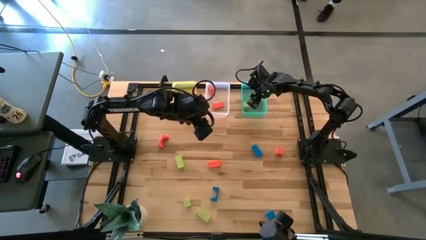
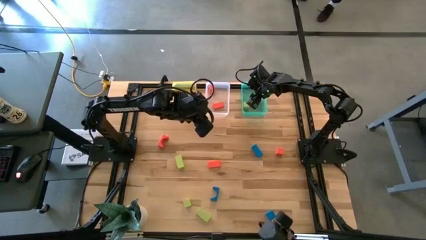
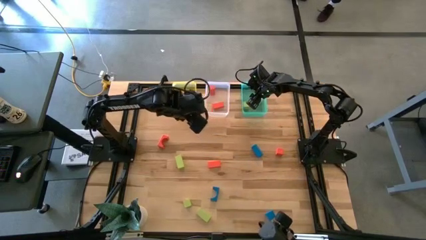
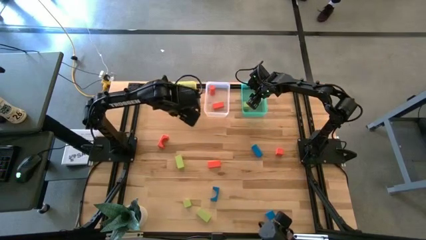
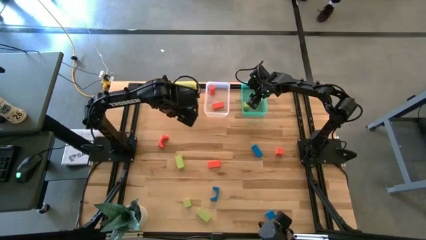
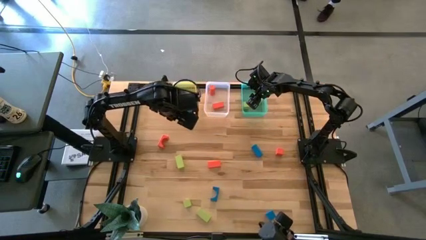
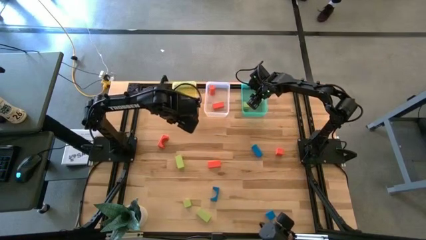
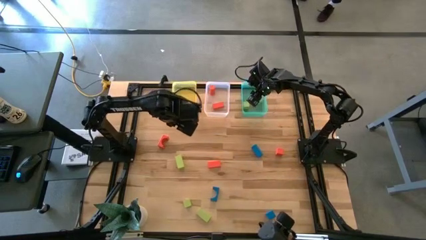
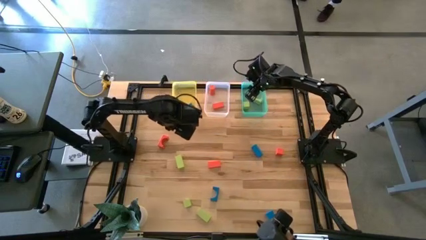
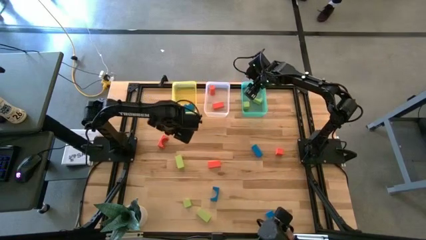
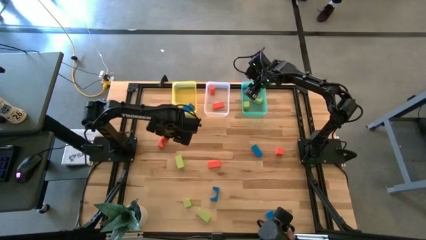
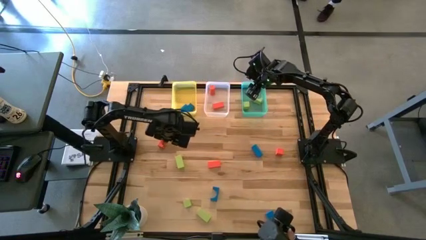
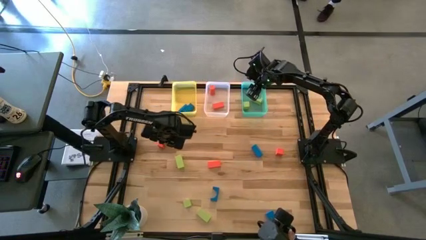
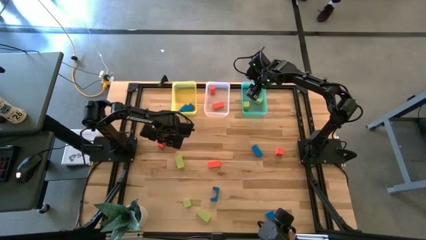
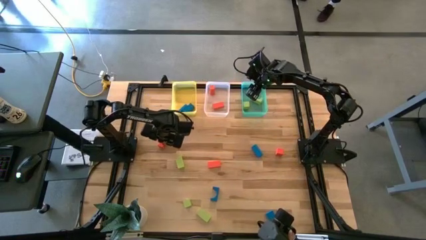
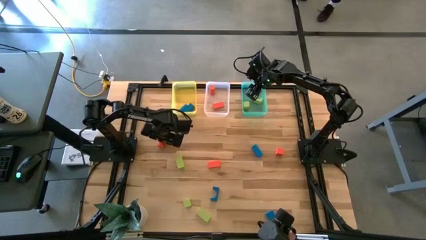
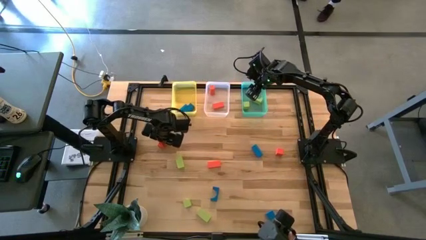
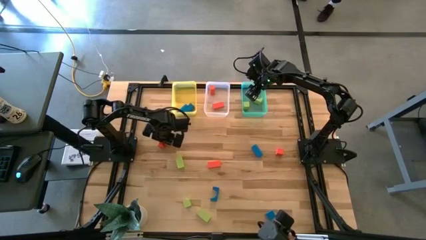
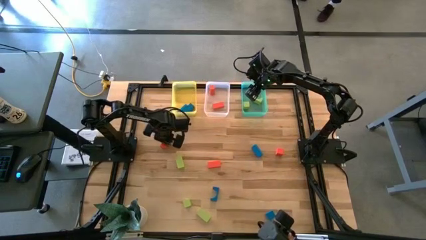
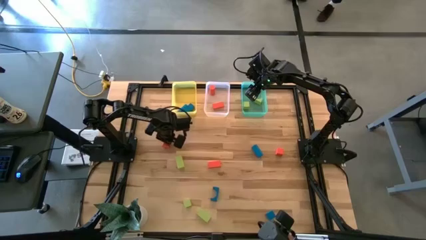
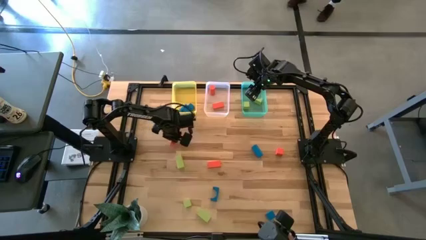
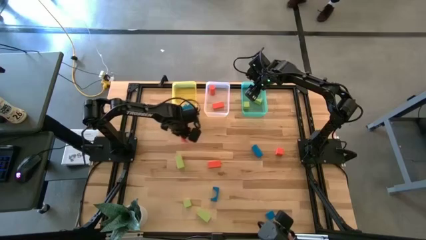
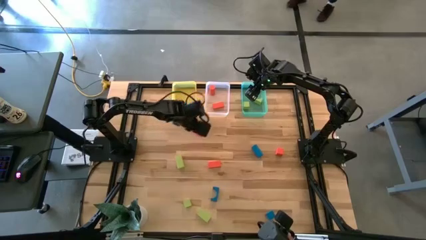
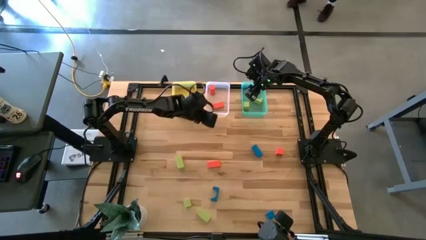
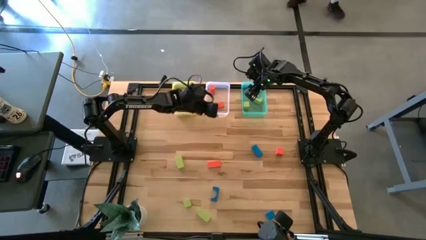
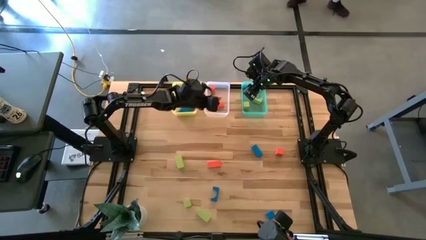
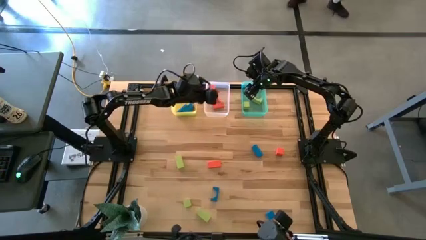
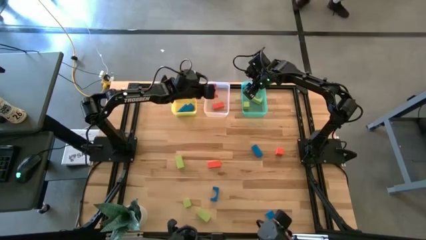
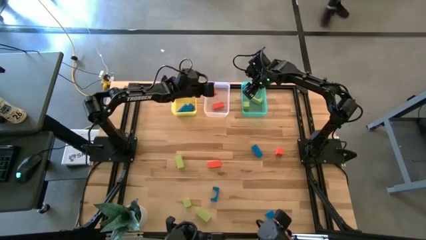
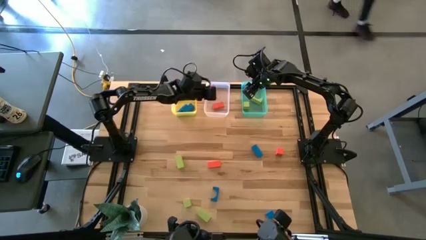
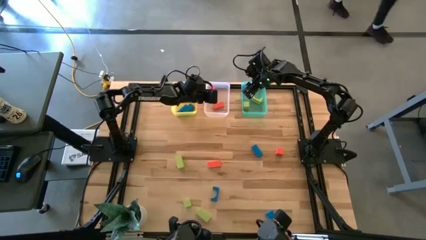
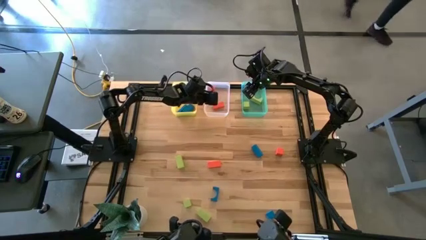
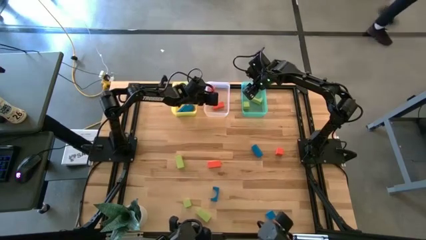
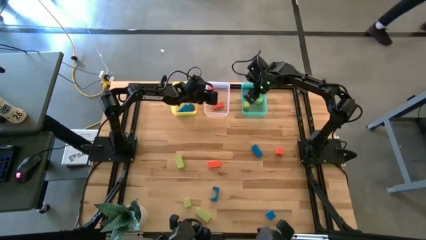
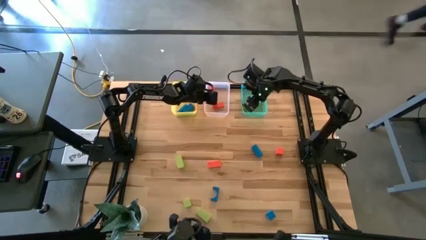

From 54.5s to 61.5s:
Task: Sort & place blocks by color
Put the orange block into the transparent bin

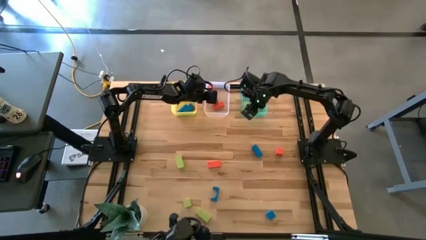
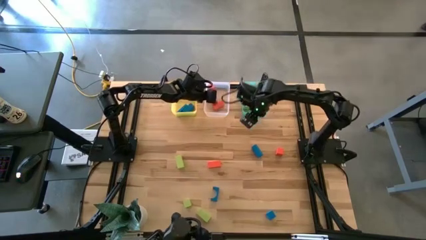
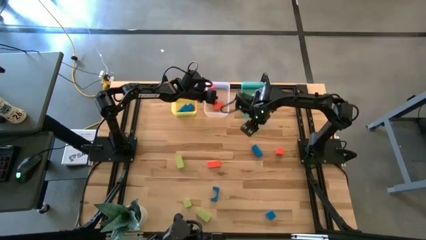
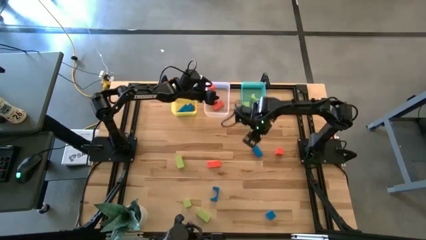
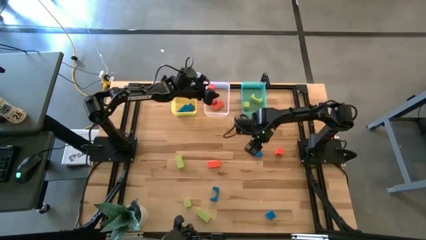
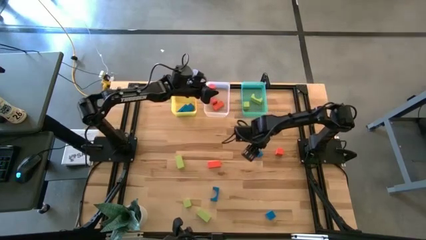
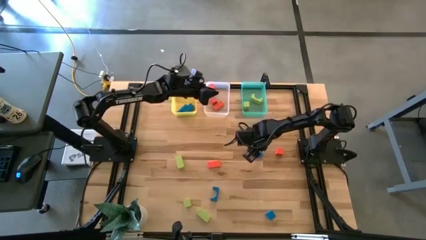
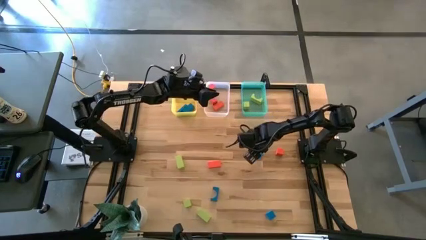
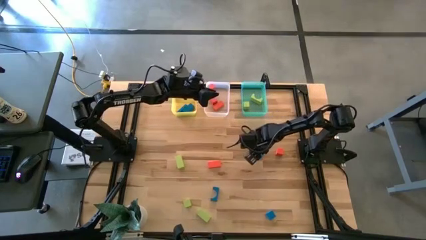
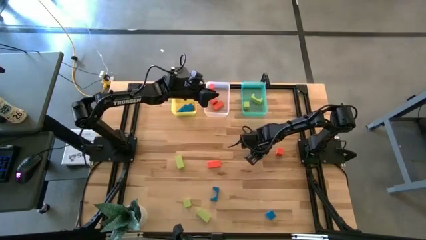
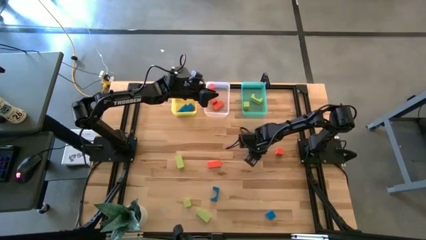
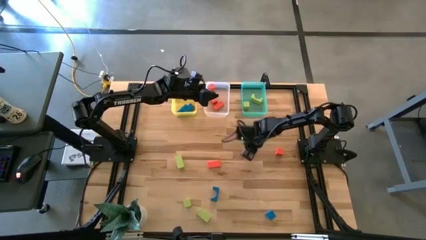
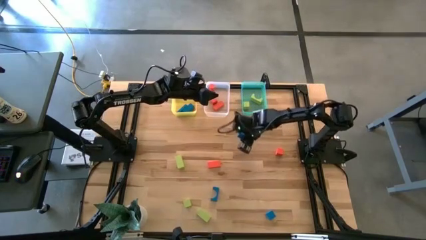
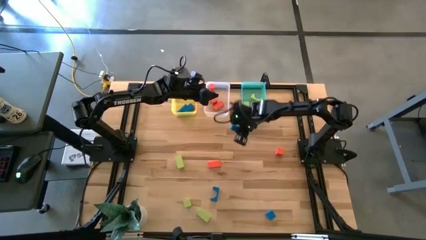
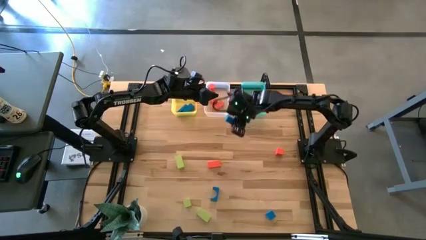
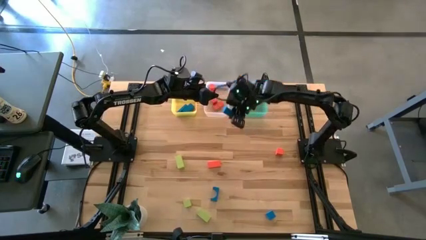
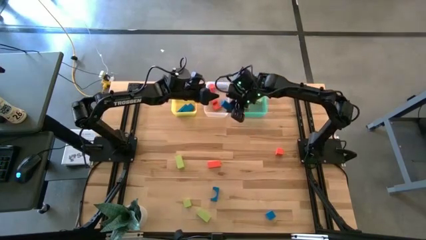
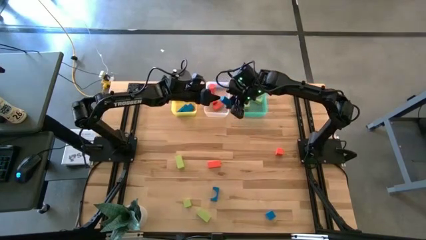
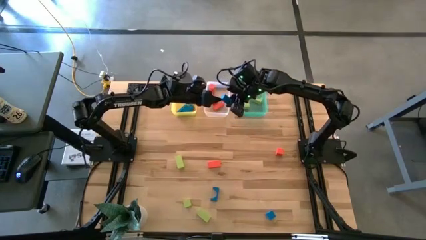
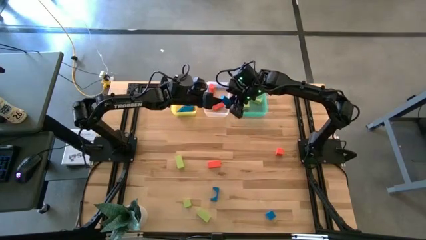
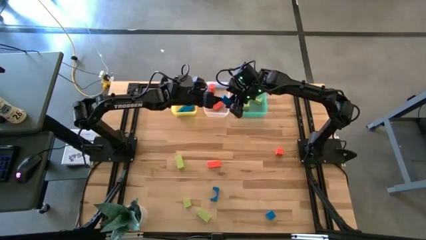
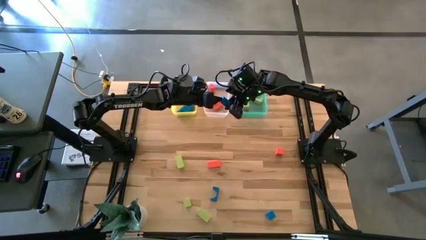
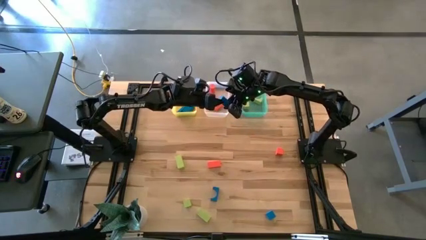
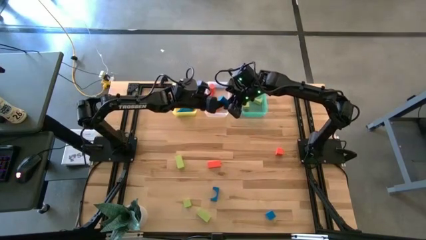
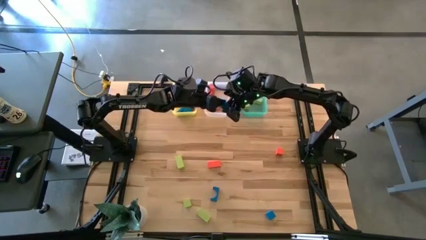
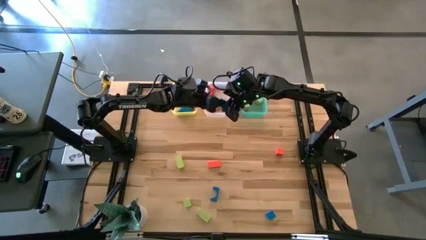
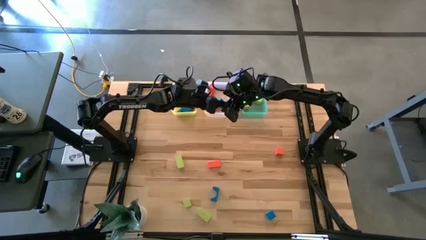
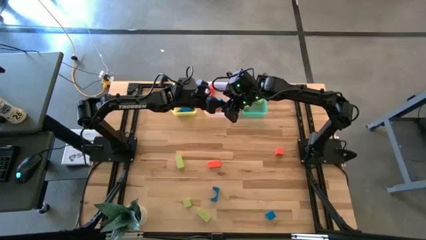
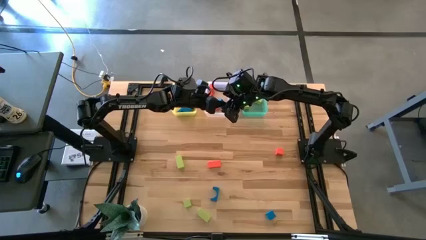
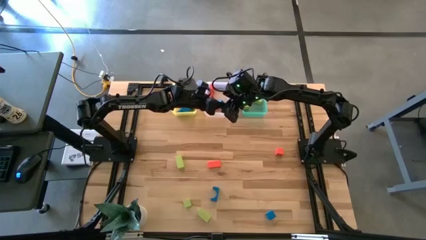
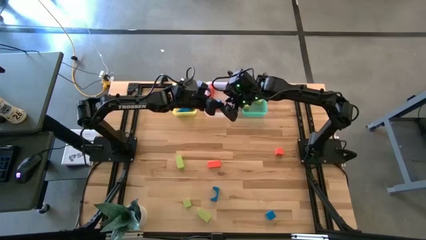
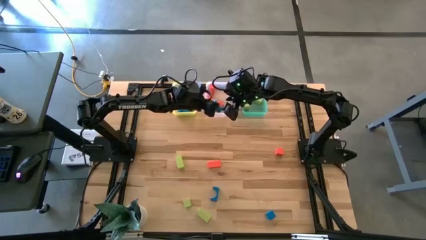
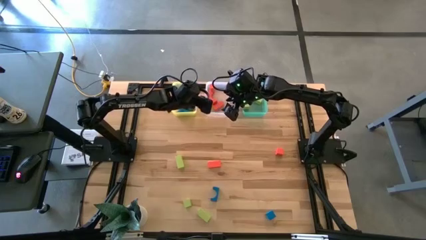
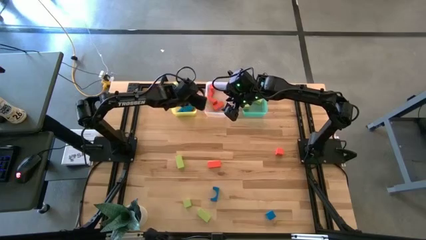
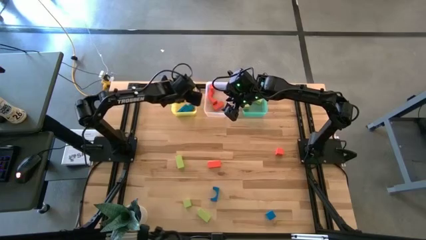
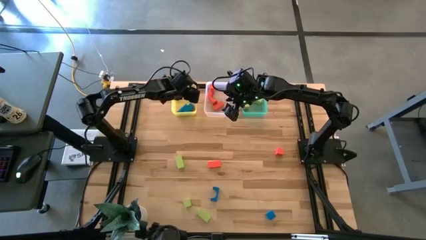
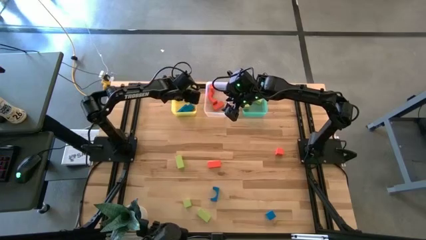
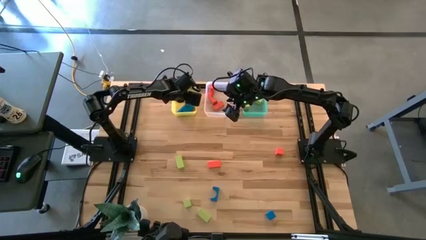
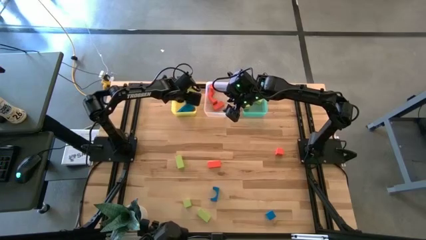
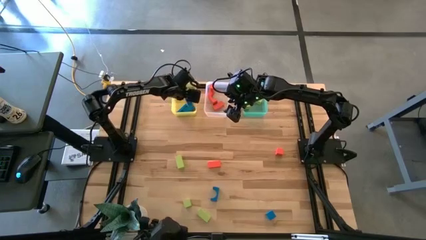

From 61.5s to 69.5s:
Put the blue block into the yellow bin

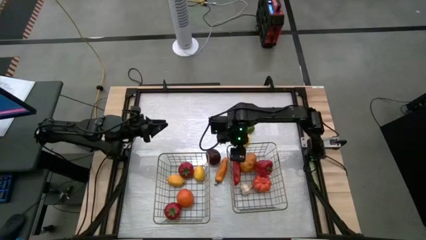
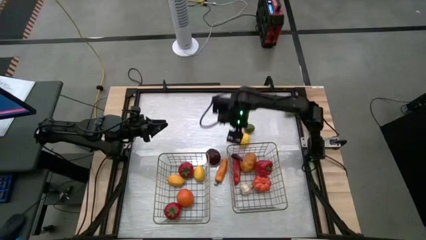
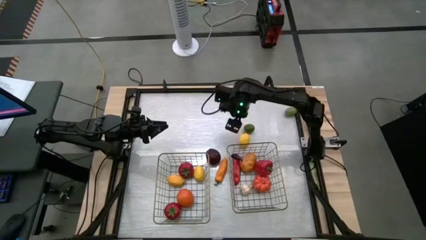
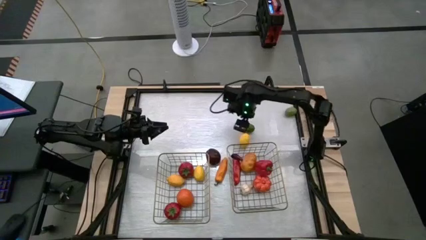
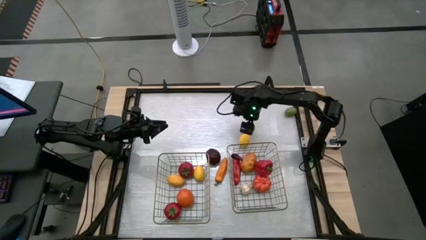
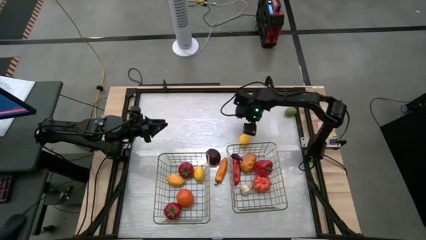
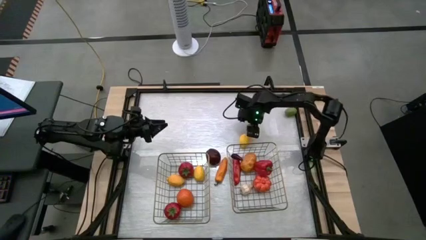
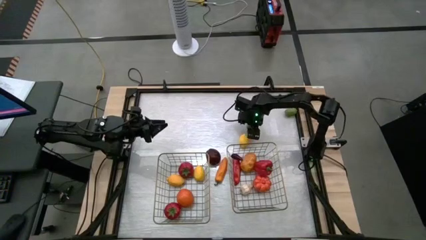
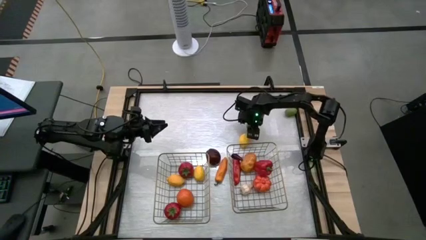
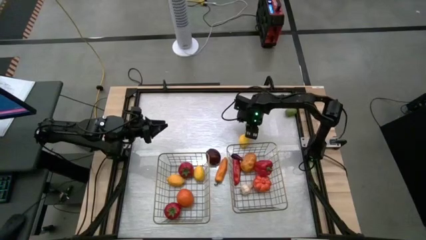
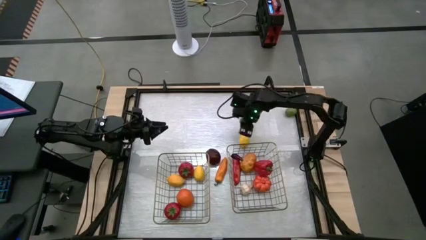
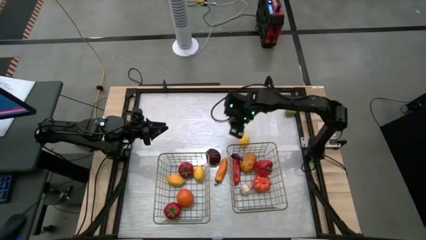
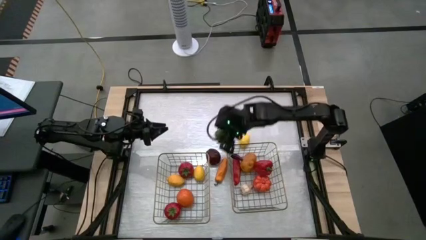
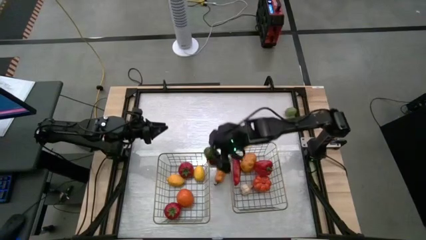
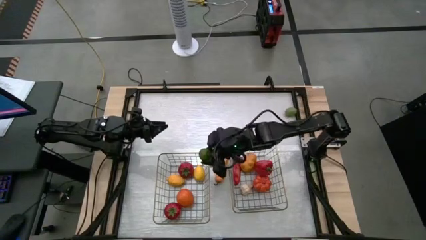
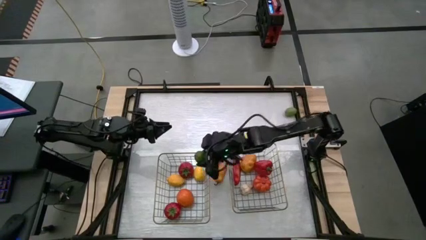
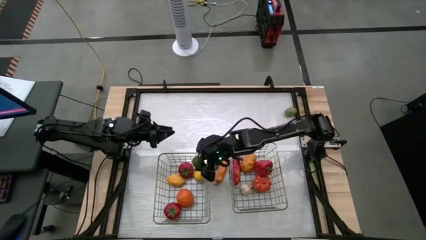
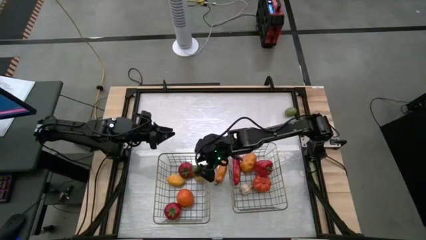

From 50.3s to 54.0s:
Task: Sort produce into baskets
Put the left lime into the left brown wire basket
